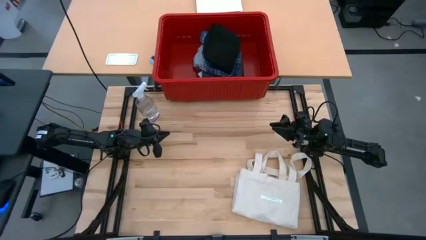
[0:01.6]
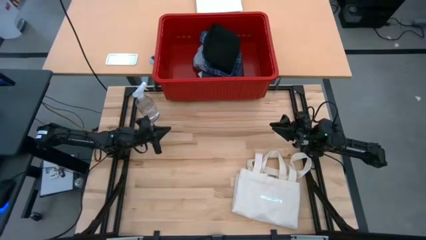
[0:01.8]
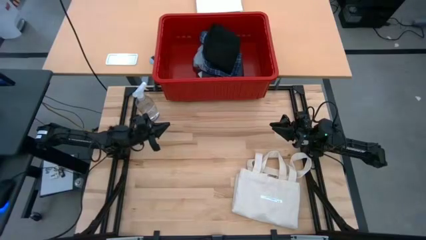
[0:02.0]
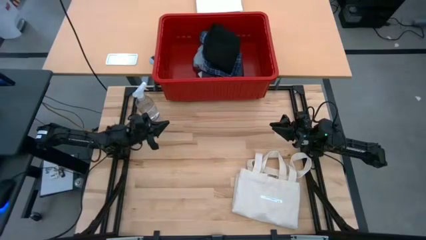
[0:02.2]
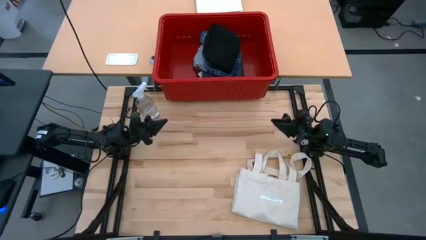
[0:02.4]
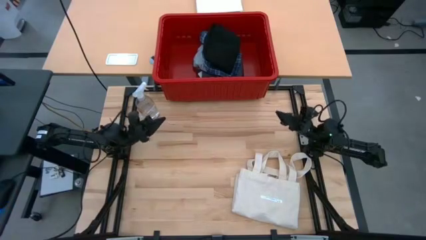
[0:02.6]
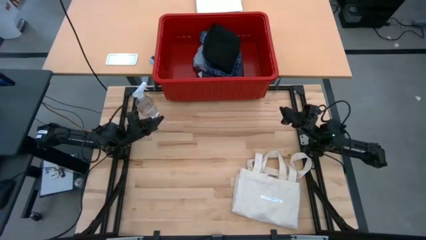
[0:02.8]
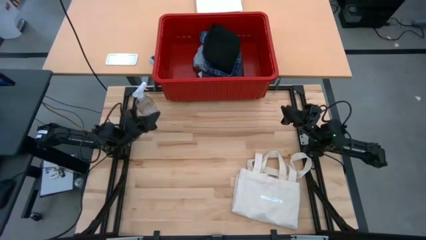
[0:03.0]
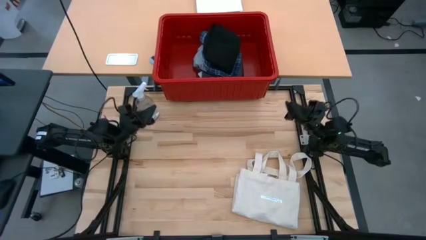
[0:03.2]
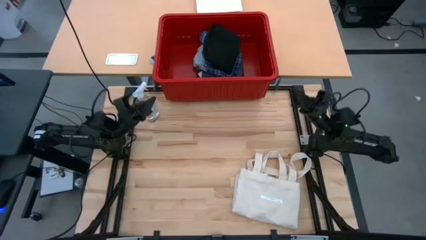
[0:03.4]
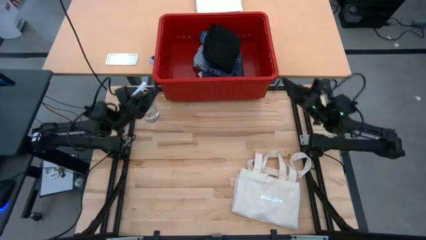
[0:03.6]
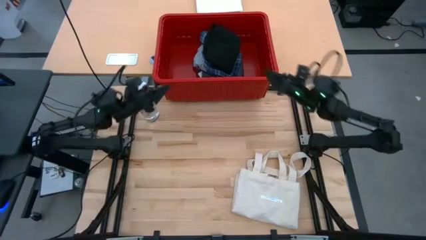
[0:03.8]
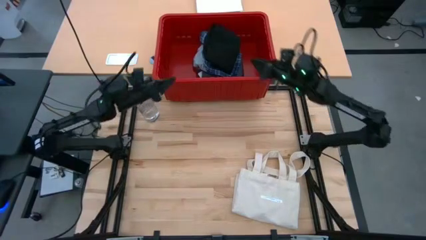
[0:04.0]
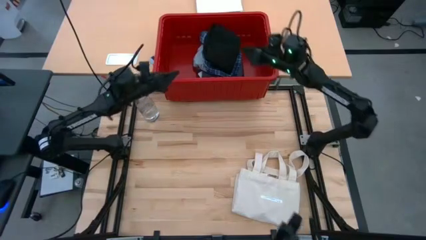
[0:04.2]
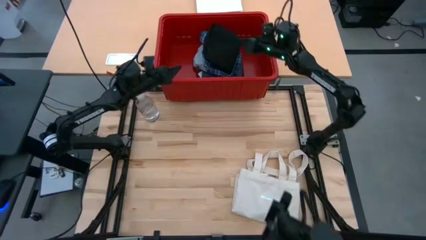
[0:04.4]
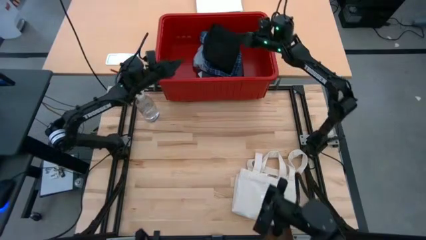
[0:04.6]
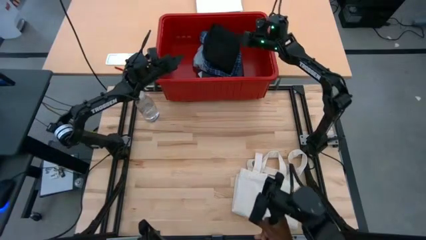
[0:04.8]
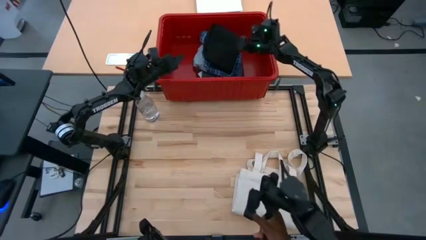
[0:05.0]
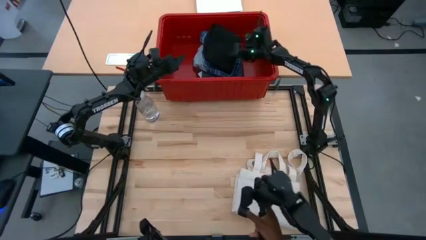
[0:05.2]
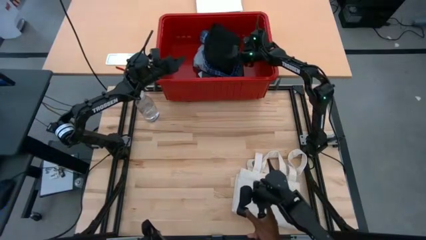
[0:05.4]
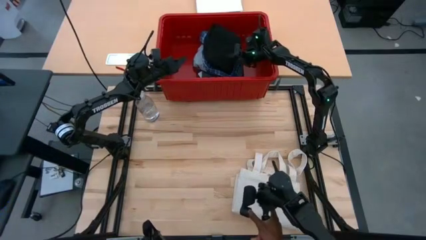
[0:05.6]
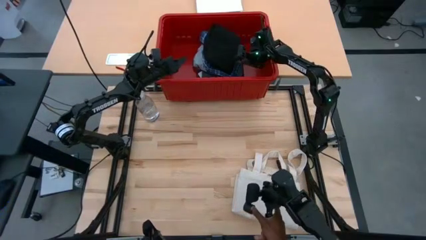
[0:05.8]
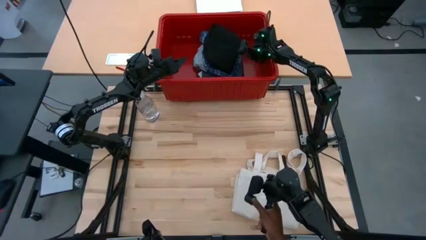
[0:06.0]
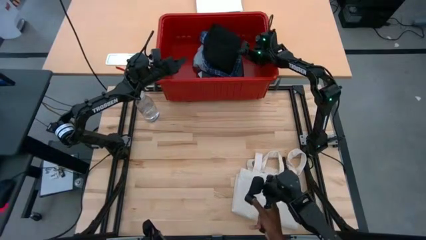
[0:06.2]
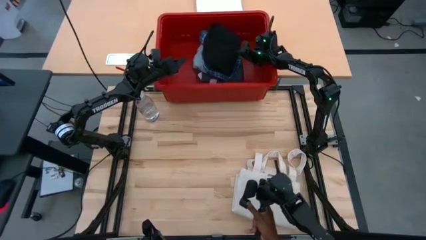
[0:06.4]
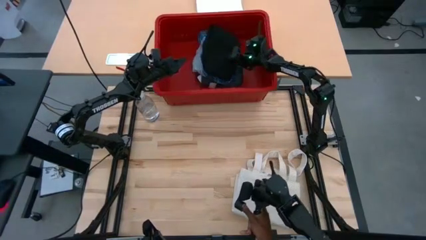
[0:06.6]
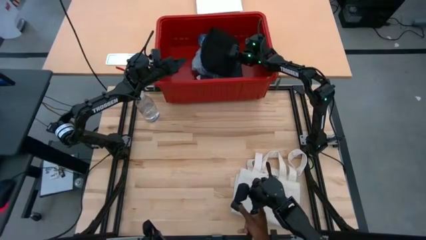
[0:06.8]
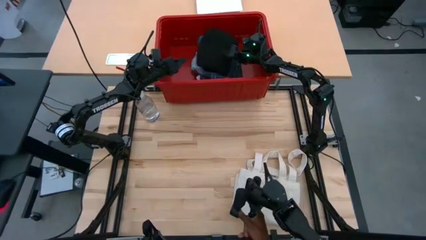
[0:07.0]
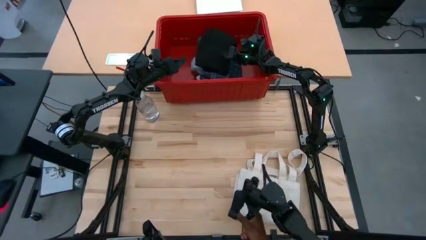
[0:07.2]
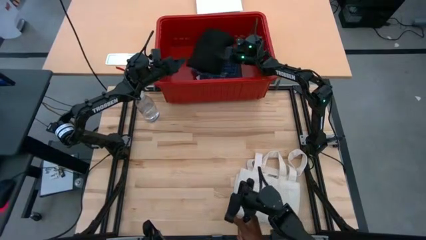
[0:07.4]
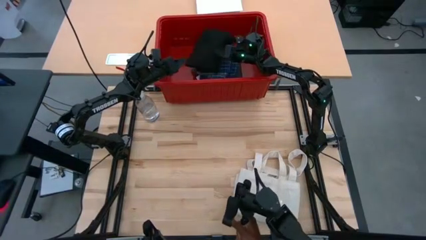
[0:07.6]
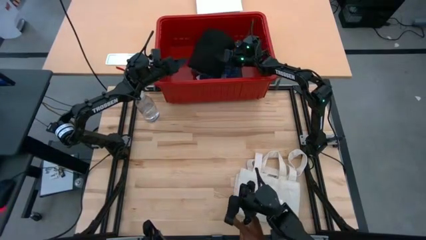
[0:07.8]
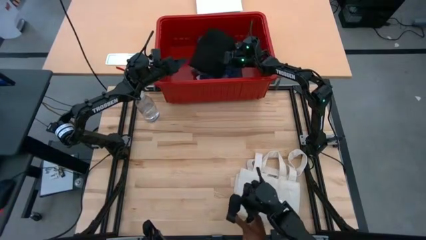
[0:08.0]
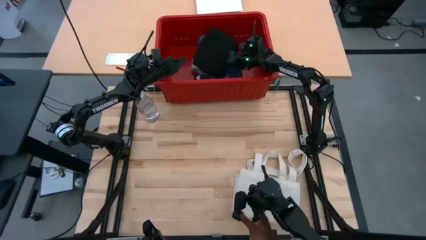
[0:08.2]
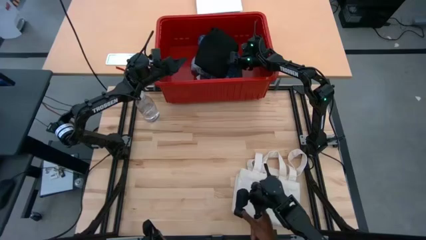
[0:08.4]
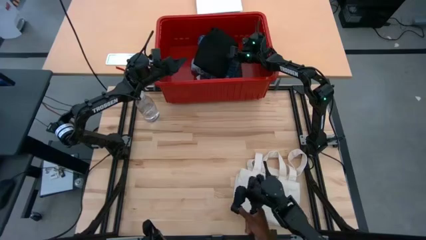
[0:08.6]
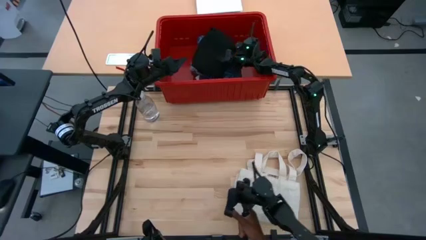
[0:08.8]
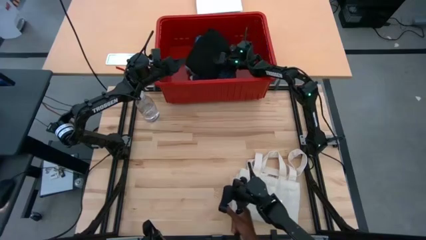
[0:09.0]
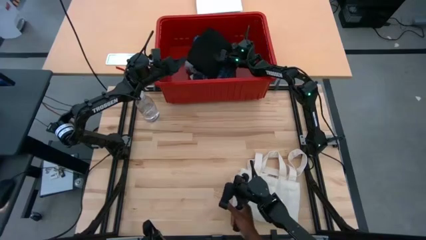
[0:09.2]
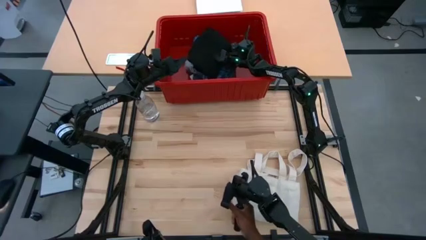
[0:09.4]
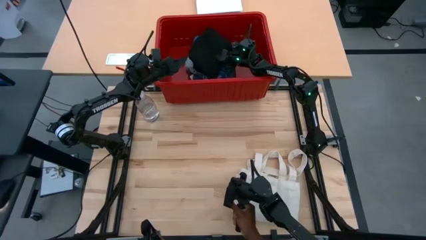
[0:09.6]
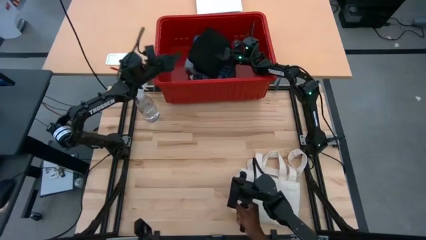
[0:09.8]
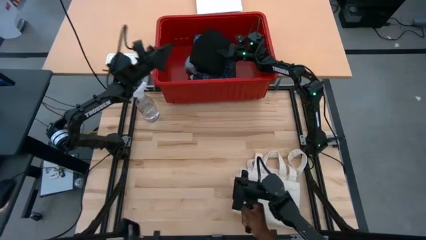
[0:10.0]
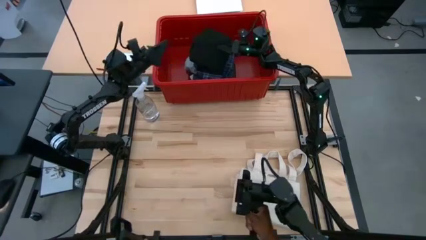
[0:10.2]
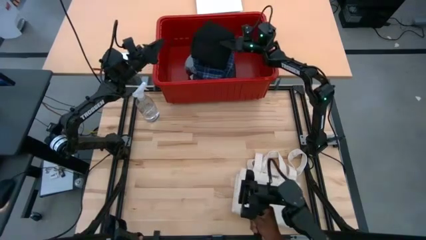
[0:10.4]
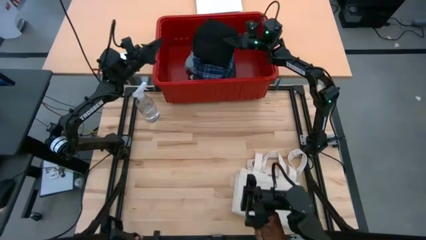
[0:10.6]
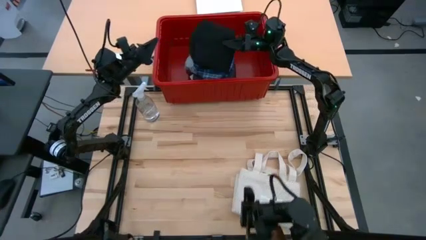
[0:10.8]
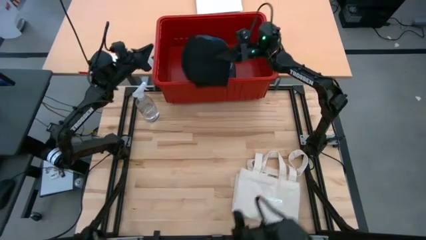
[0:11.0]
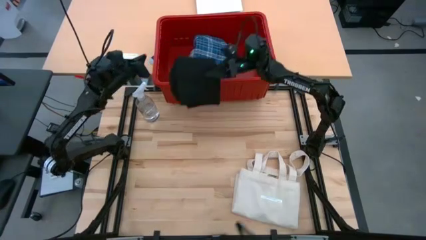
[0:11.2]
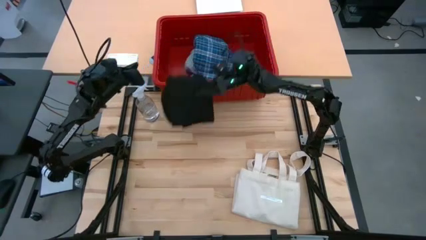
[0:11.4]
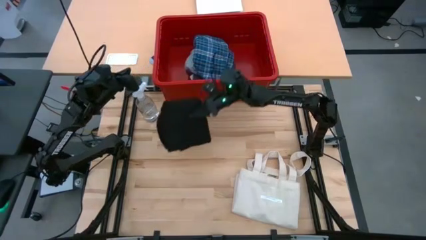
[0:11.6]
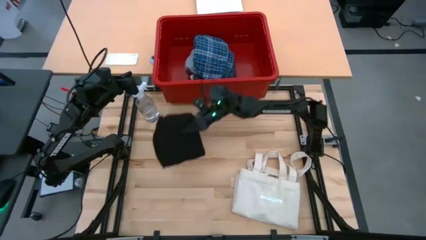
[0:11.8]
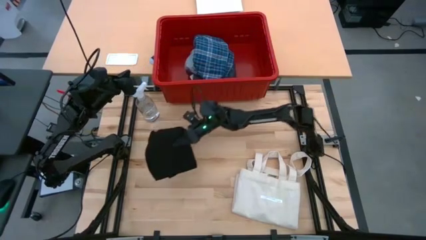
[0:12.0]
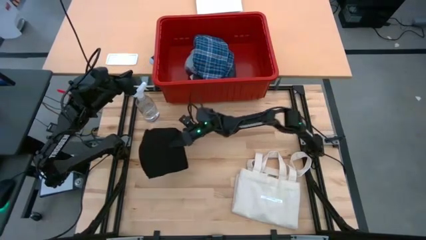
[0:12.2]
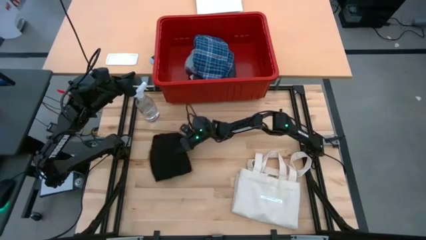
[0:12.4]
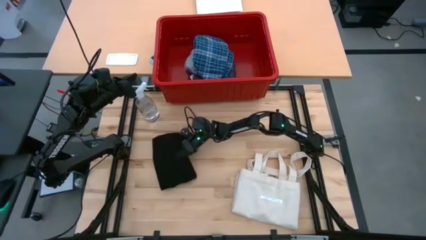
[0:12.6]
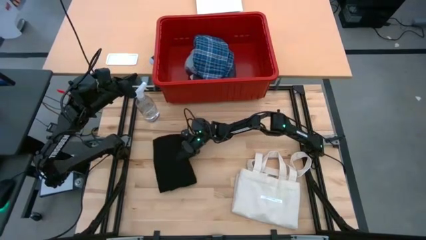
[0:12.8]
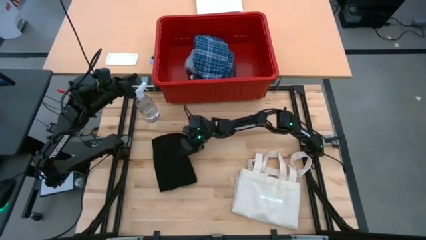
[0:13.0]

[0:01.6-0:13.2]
Task: Fold laundry
Remove the black shirt from the red bin

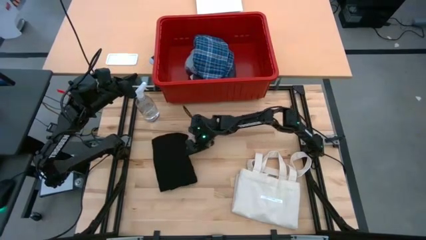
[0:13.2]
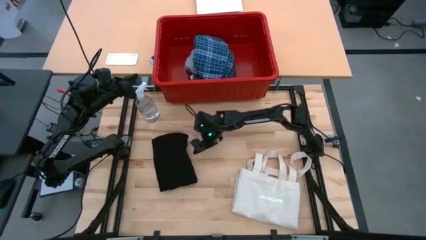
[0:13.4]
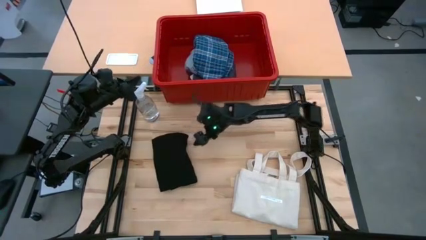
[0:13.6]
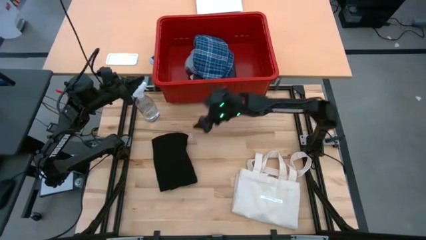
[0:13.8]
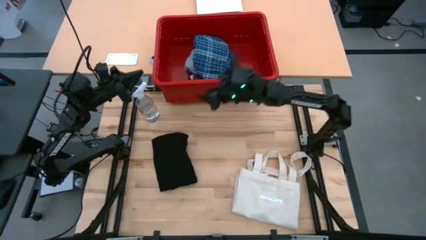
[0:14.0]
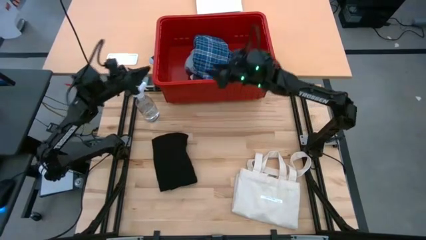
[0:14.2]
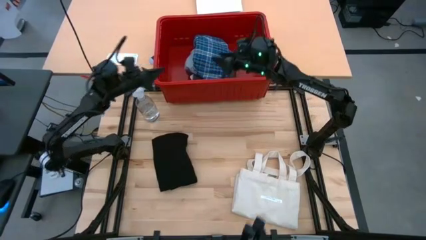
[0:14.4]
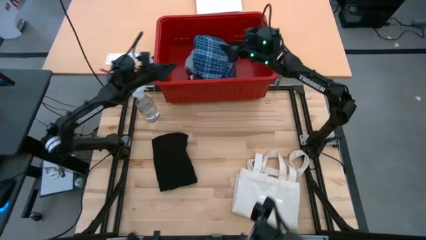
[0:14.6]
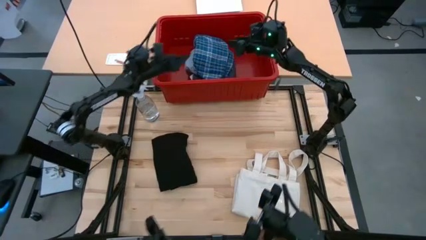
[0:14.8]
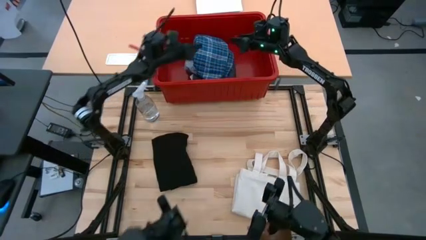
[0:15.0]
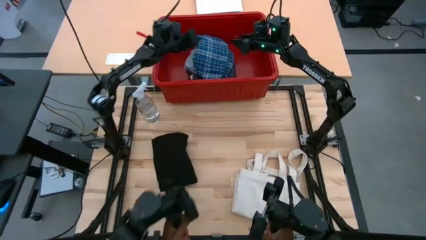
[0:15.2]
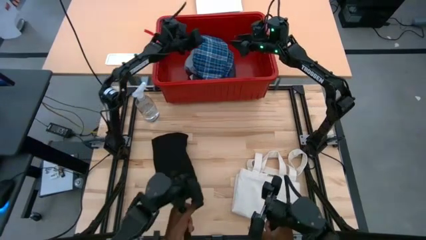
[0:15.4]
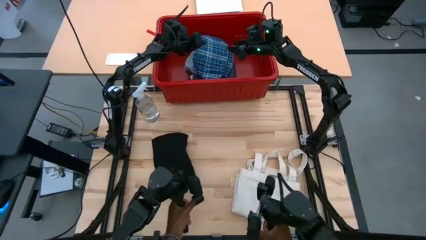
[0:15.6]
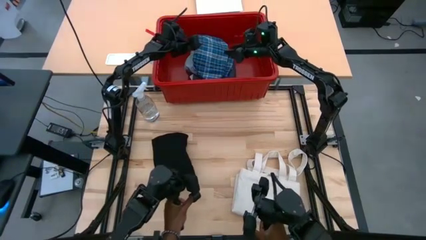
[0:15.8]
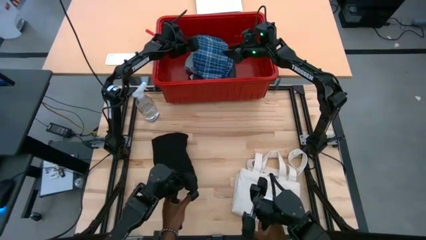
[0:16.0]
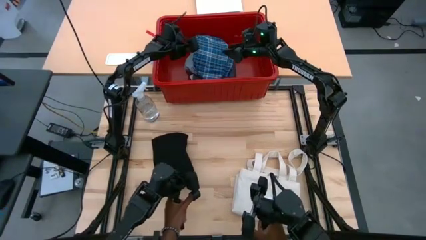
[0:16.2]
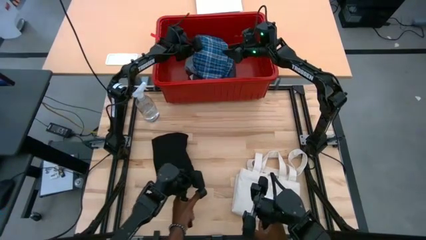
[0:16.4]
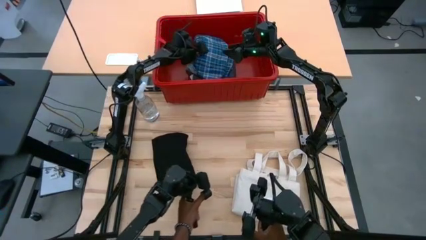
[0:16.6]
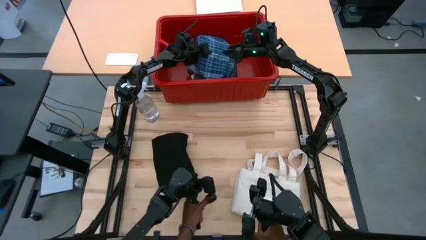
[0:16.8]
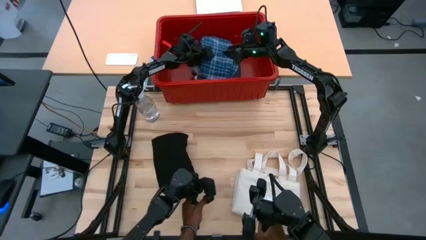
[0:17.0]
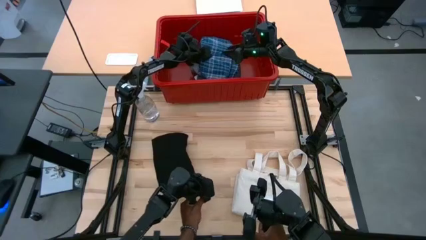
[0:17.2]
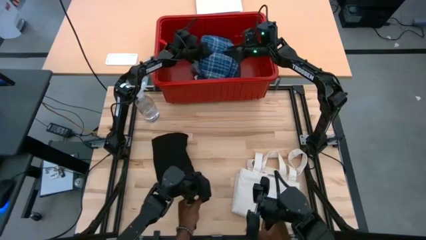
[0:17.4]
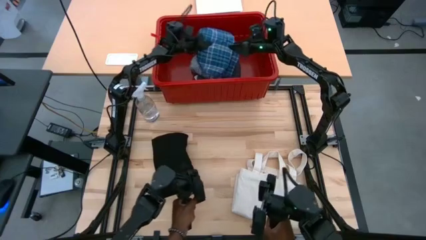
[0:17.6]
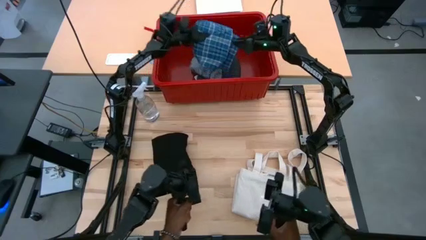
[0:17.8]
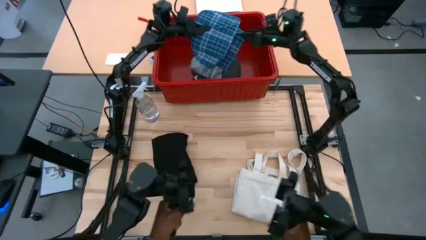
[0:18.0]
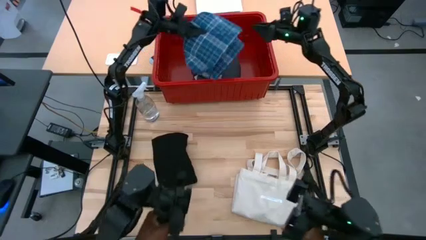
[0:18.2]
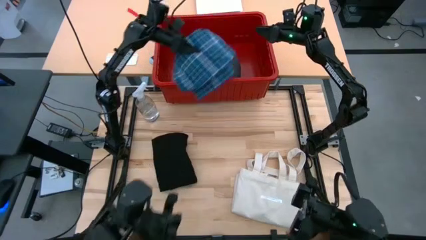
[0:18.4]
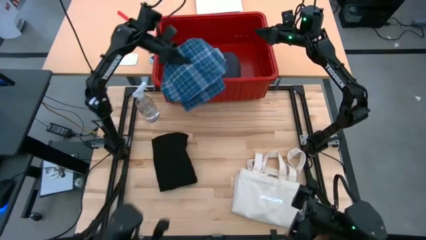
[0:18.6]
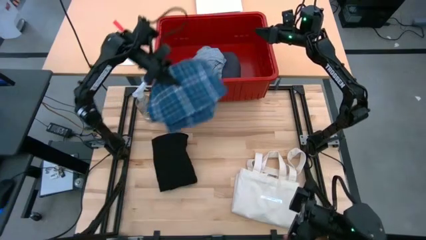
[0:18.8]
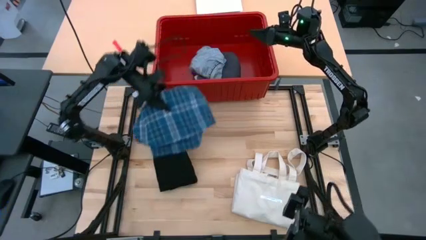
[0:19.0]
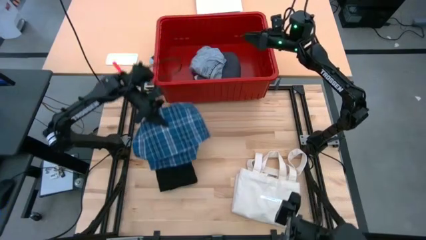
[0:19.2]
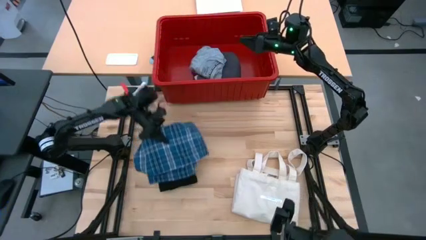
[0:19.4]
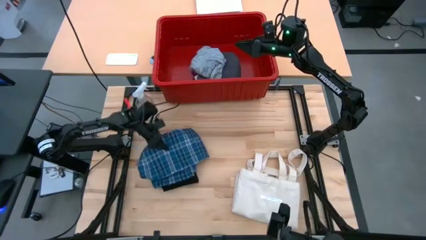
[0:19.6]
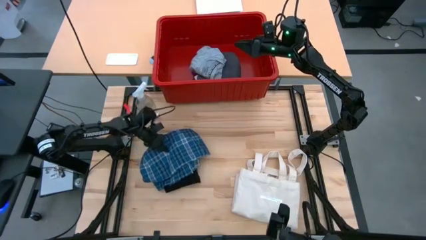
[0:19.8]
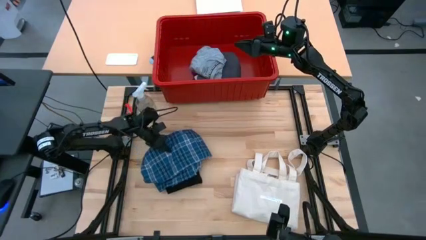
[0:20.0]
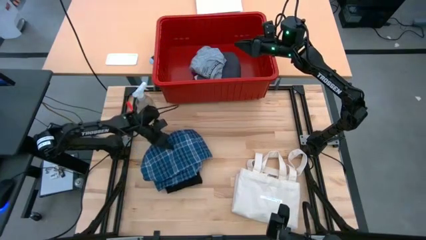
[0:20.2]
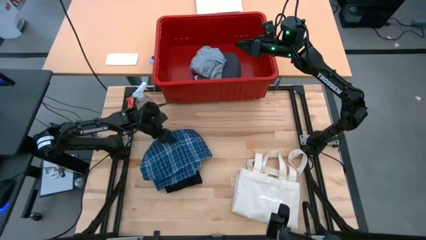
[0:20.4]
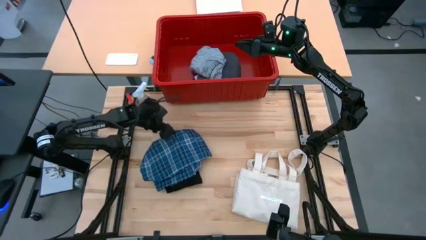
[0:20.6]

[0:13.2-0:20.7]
Remove the blue checkered shirt from the red bin
